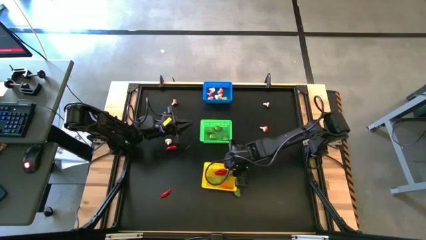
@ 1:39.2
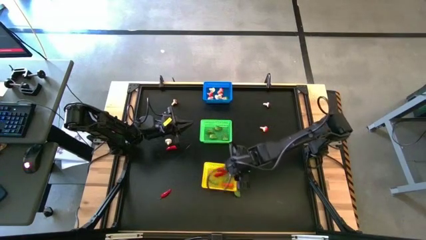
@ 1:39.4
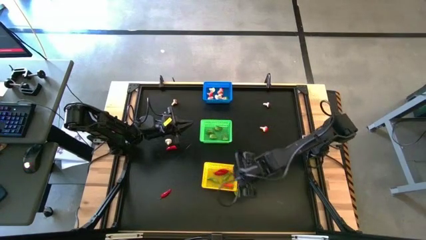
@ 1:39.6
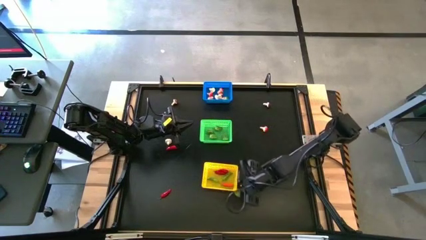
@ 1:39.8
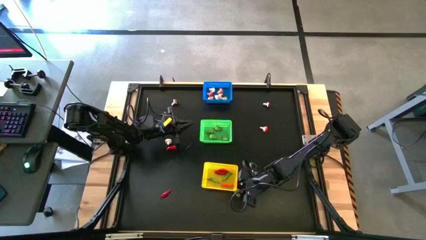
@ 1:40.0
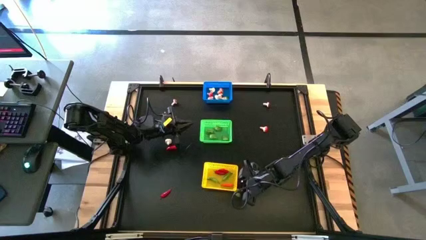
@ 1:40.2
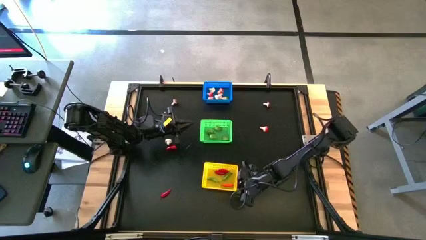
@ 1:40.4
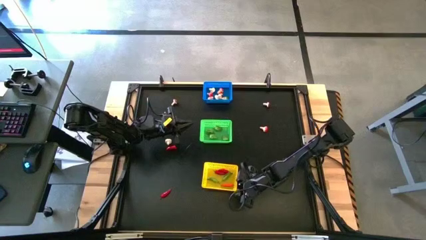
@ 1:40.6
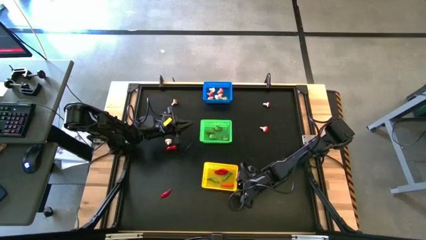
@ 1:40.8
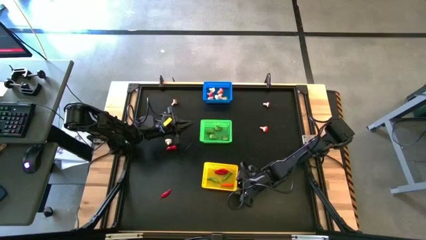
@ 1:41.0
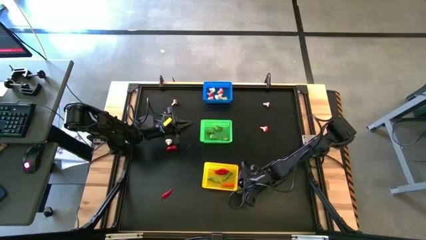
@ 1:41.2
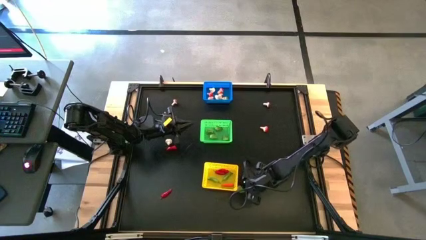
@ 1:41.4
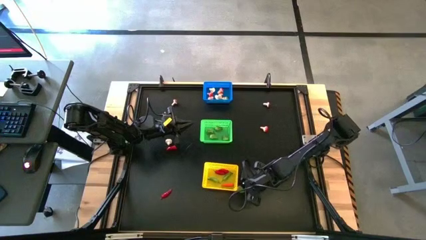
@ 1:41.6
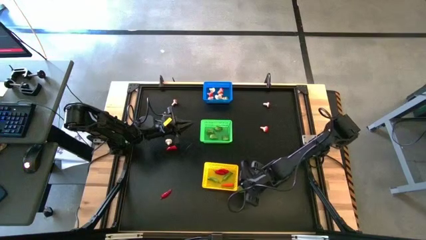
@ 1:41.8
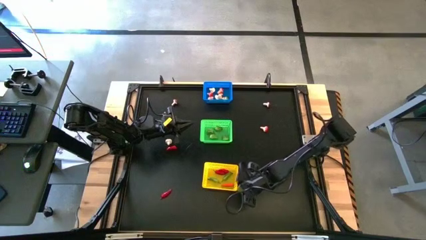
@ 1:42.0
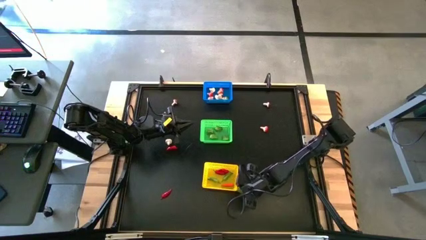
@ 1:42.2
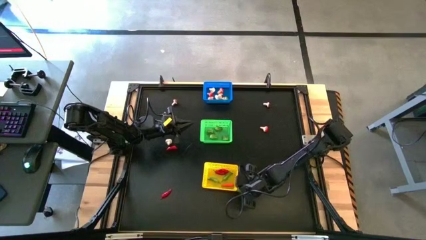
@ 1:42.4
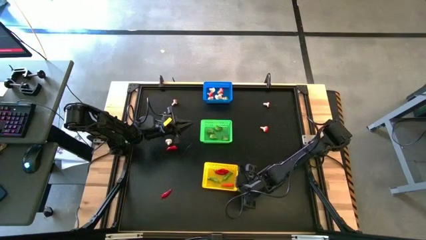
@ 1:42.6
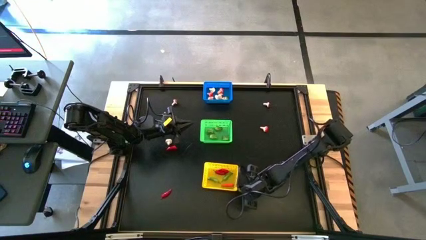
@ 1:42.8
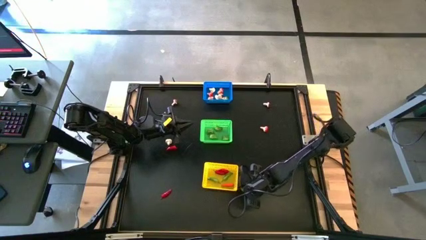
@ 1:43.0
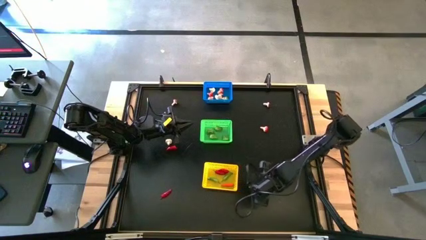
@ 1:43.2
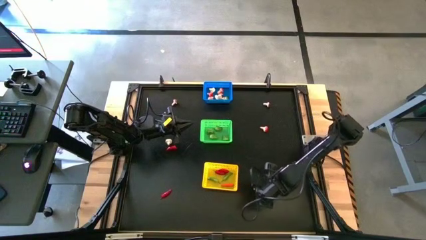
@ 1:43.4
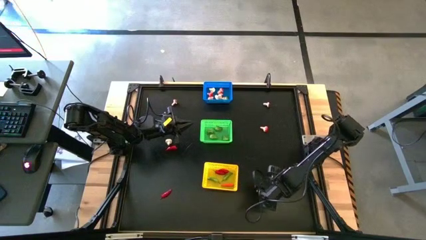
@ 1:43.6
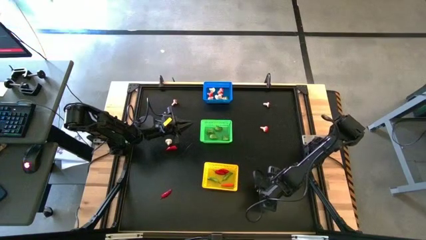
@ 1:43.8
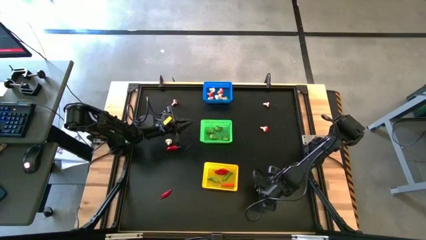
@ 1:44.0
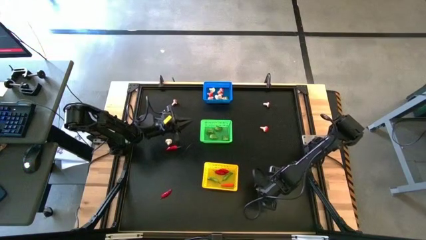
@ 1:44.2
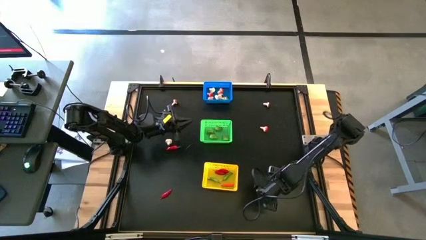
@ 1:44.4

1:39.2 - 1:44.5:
Task: Sort produce into baskets
Move the green chili pepper to the right

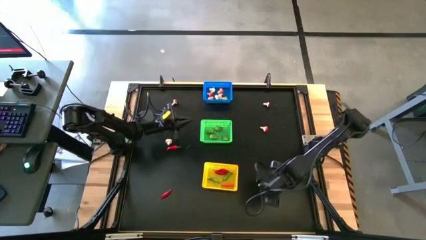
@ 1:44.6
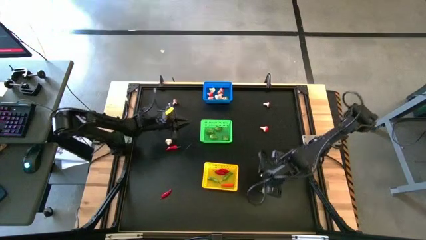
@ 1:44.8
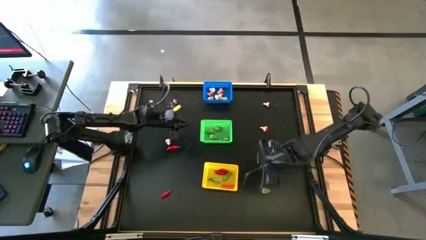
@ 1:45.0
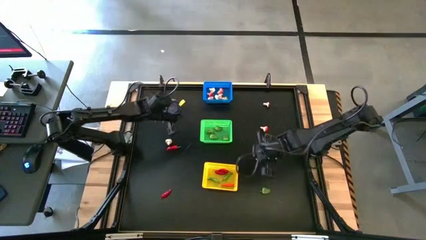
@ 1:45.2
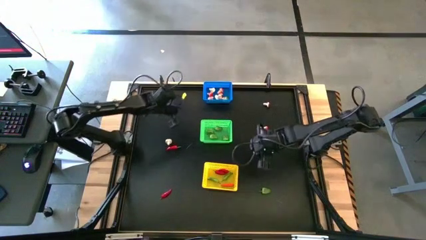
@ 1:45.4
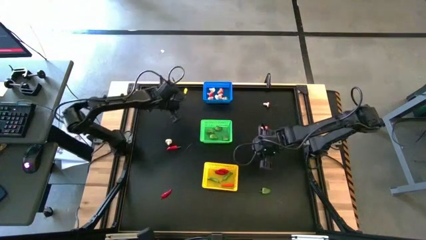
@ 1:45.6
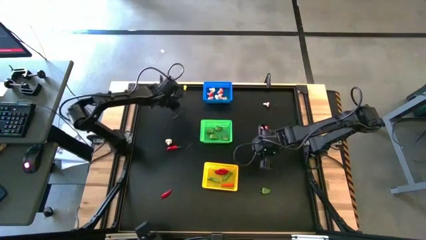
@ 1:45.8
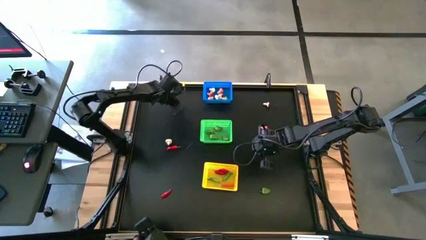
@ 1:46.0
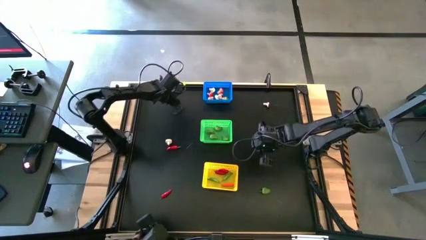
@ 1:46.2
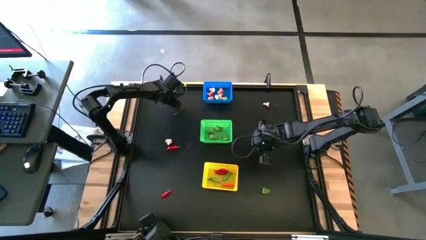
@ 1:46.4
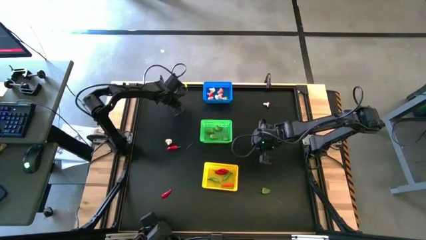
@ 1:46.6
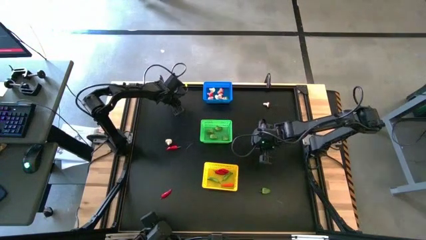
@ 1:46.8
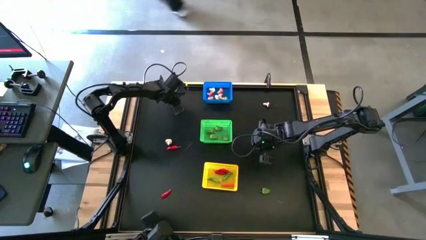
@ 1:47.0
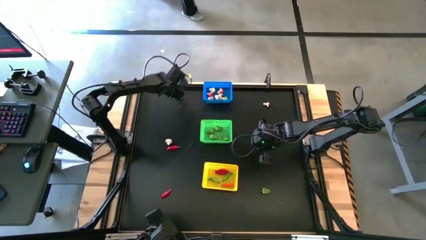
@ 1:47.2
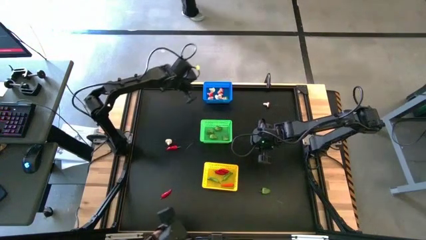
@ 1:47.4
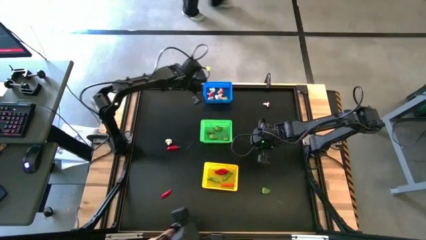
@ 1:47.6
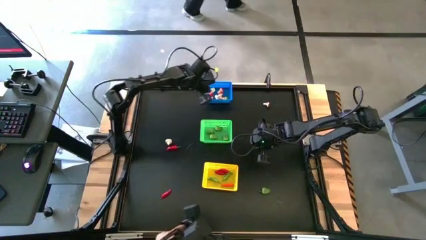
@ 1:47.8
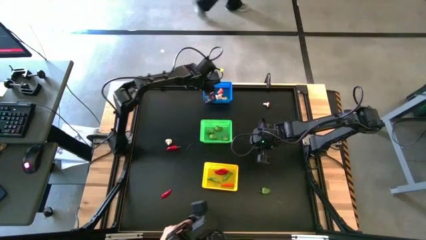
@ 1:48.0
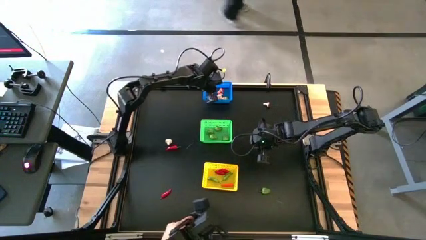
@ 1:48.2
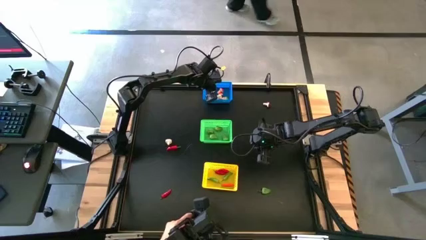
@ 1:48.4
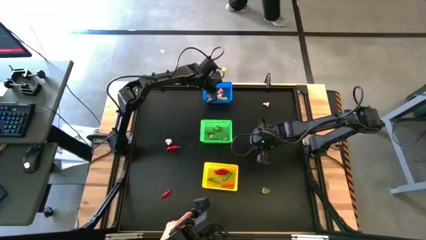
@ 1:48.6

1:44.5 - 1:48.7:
Put the brown mushroom into the blue bin

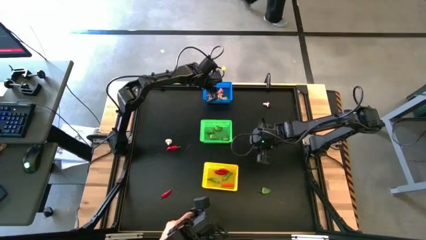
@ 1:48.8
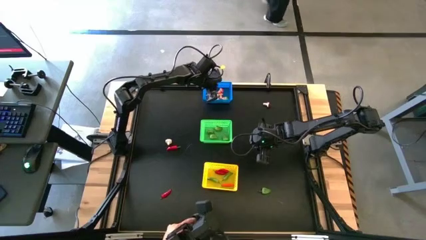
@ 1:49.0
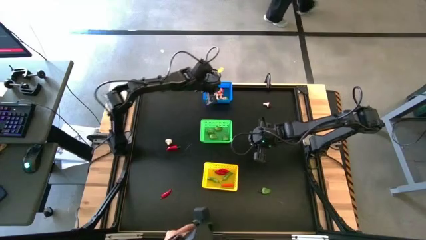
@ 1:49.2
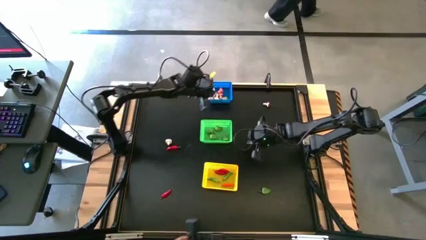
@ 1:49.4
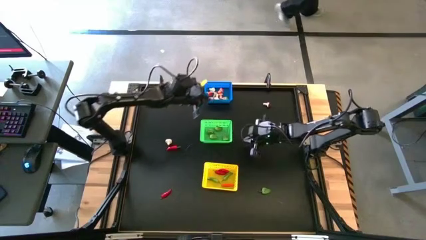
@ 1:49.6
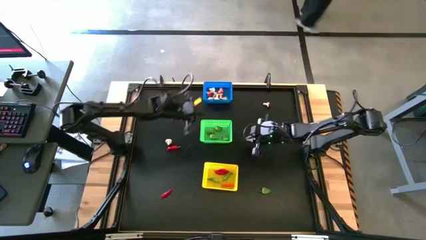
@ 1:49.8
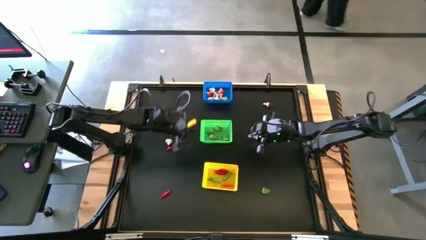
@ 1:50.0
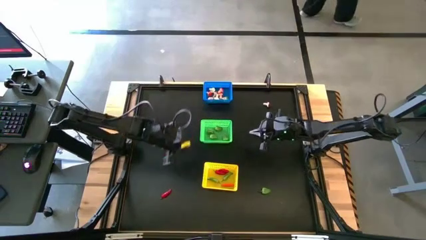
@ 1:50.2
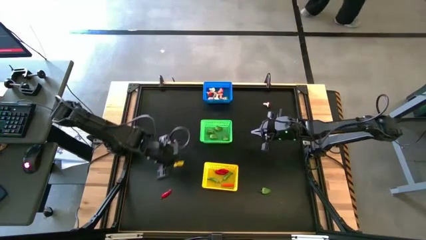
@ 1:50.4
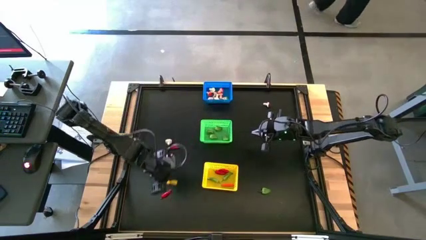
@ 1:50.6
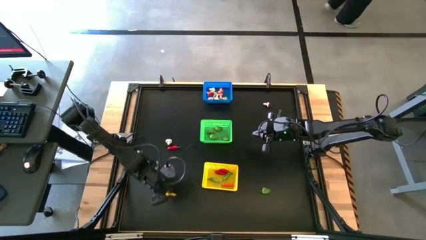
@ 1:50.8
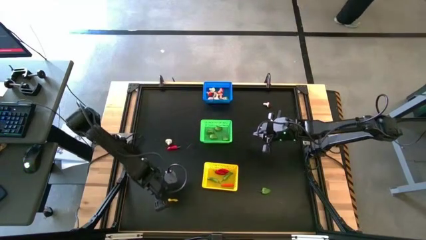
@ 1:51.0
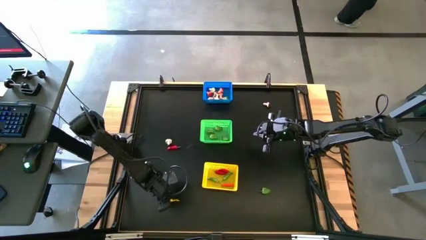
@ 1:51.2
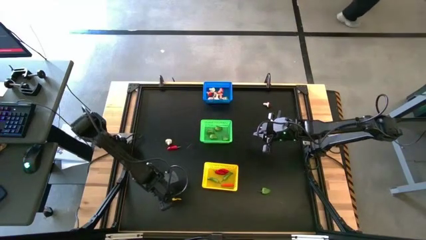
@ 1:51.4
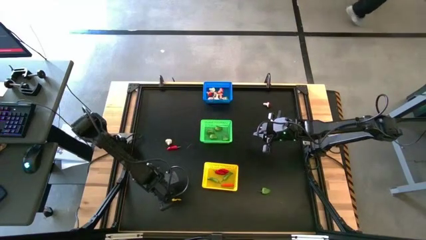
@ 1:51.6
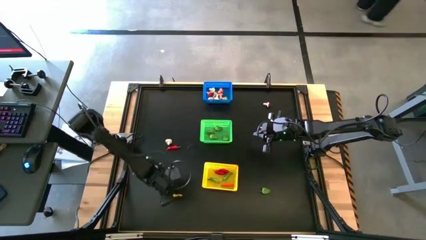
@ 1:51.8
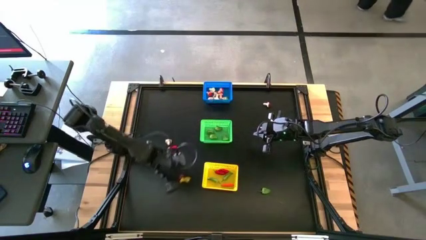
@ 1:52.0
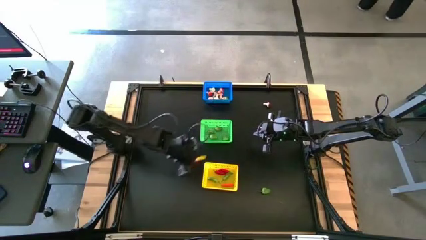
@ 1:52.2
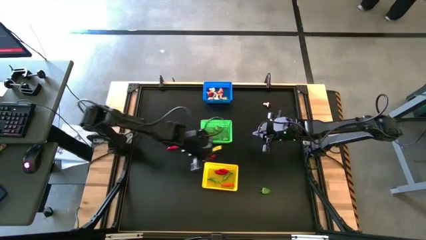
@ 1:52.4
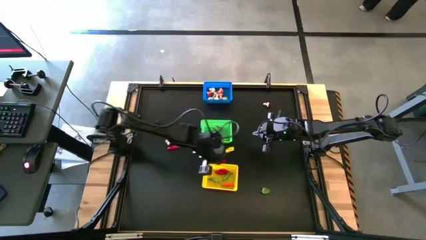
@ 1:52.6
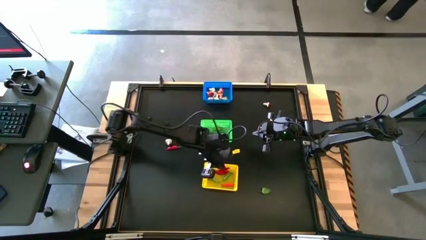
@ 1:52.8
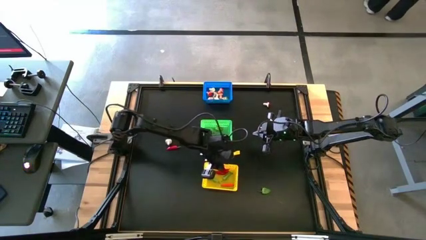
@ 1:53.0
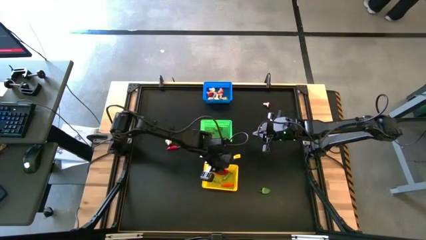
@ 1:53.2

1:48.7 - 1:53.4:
Put the red chili pepper into the yellow bin

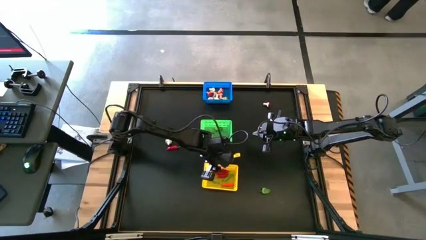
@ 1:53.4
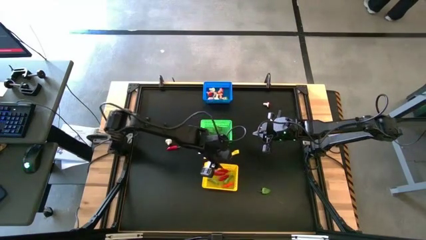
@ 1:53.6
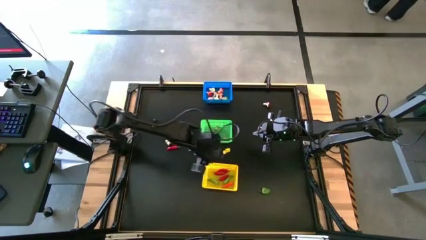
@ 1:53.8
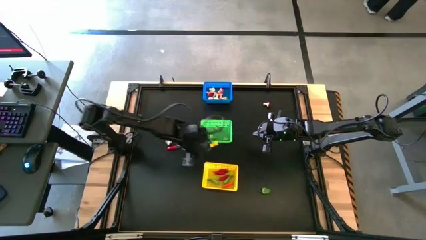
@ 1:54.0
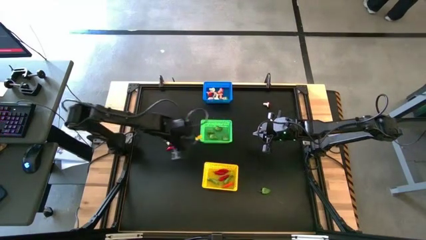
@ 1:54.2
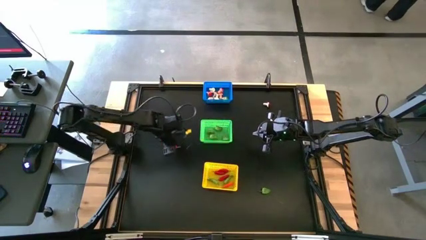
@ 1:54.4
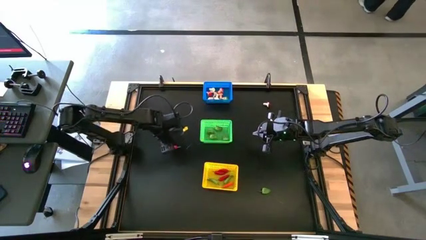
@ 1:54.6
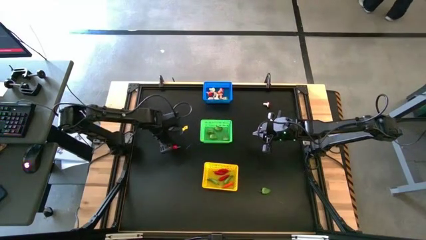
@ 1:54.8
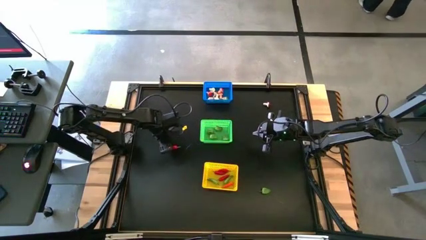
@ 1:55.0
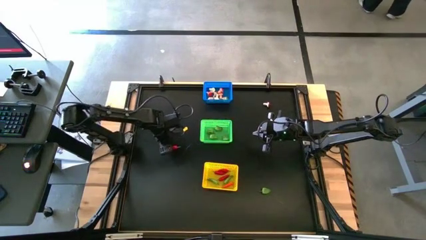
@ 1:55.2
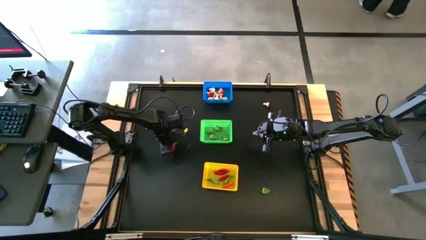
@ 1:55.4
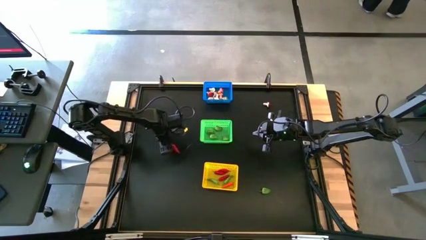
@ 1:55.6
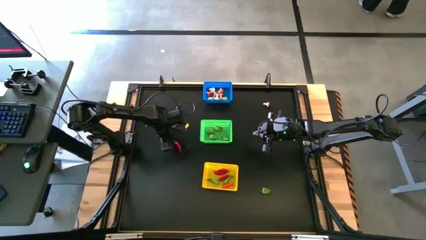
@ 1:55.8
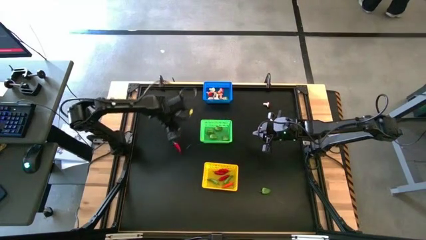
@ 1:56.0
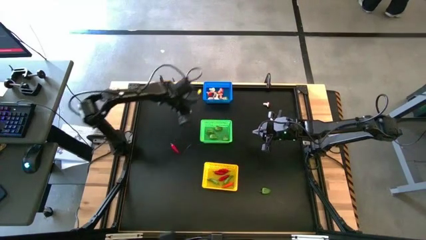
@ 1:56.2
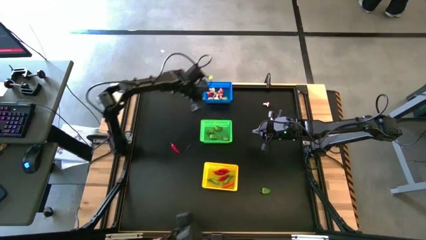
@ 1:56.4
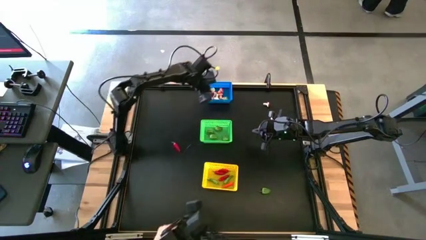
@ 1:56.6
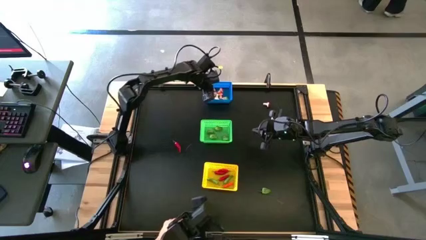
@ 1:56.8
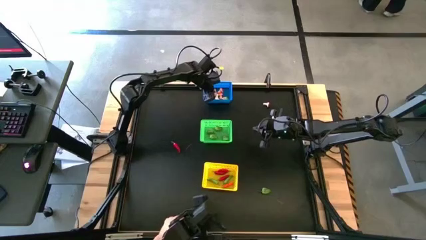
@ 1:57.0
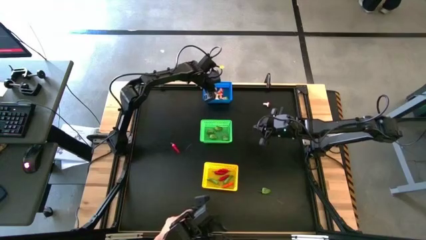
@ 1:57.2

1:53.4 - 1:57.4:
Put the brown mushroom into the blue bin
